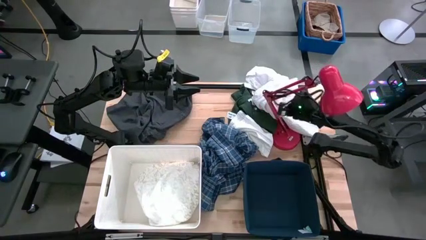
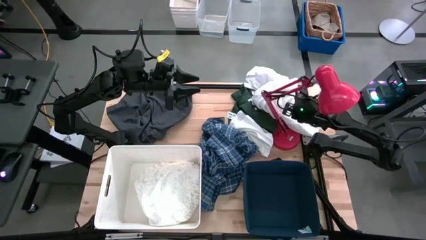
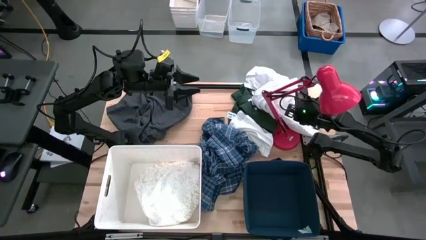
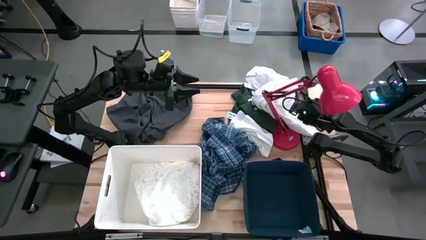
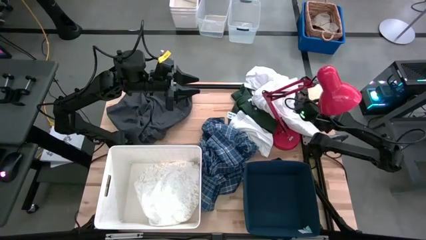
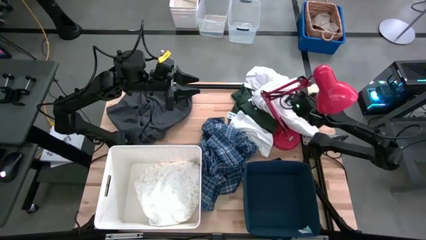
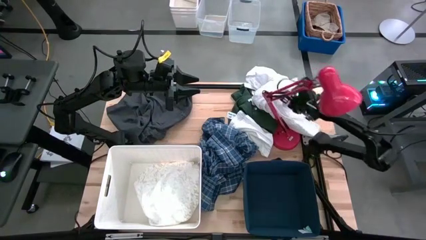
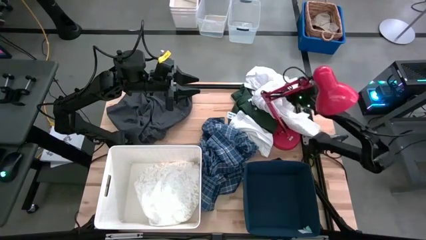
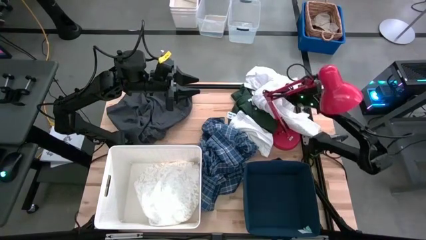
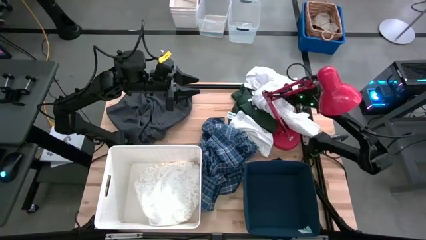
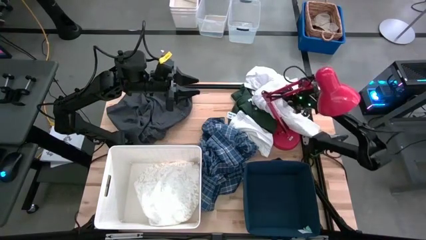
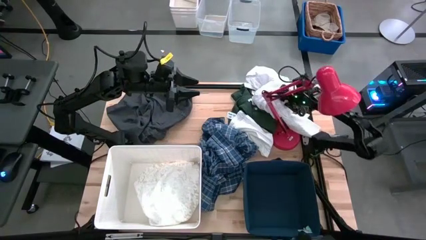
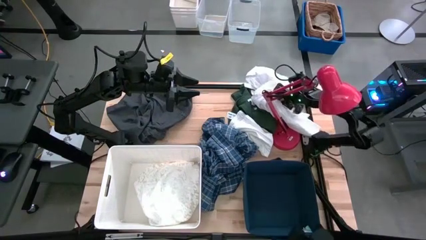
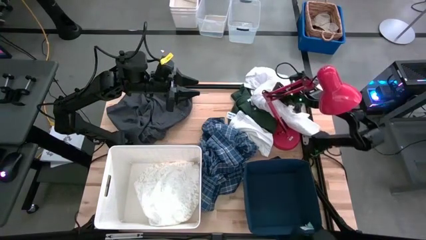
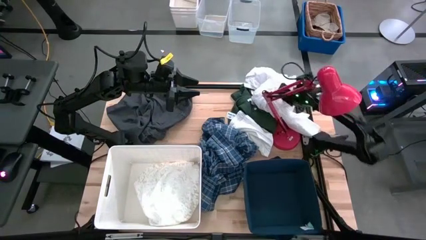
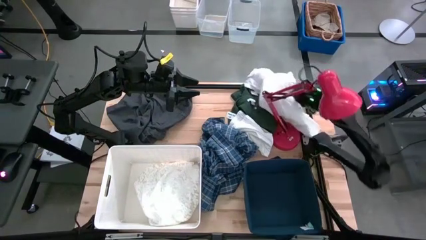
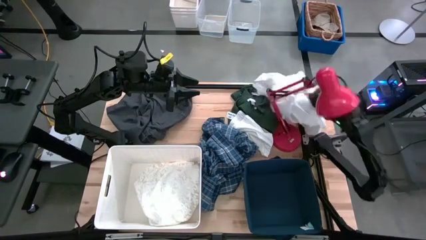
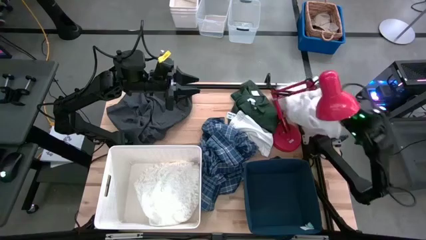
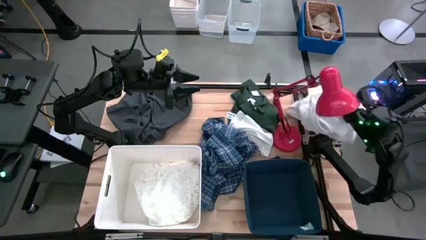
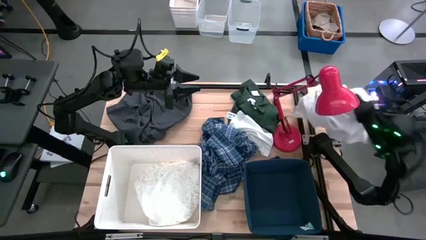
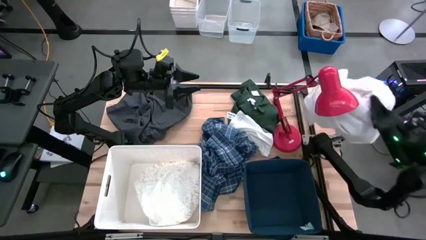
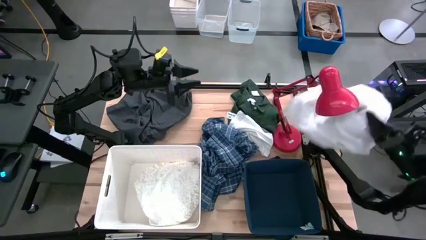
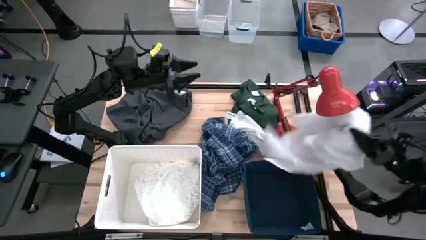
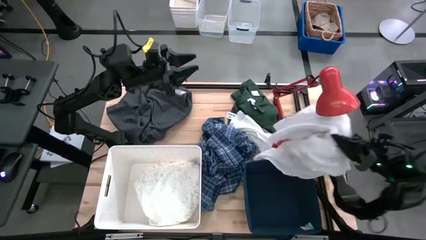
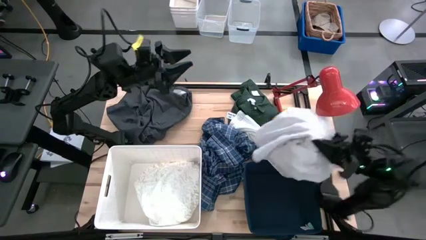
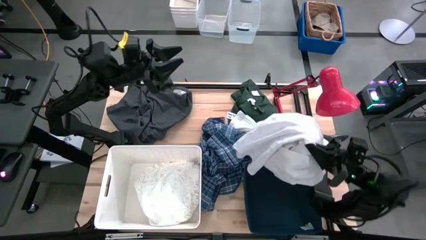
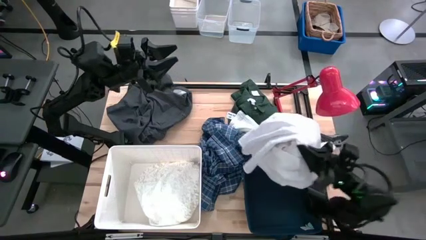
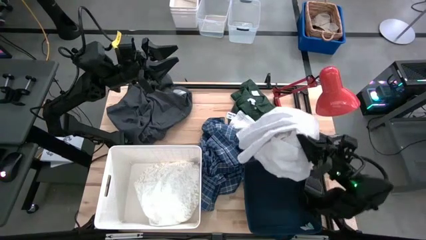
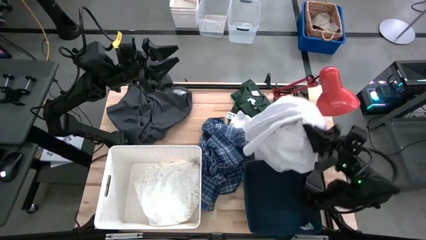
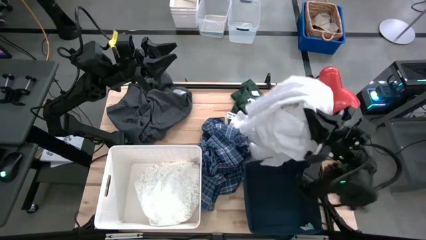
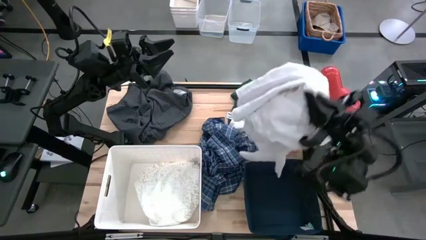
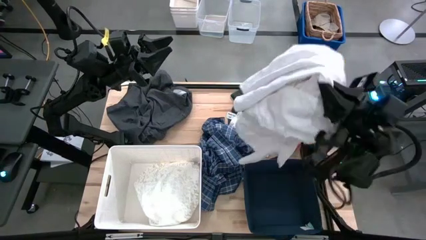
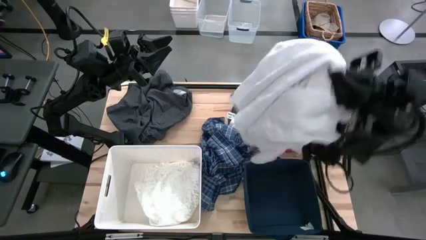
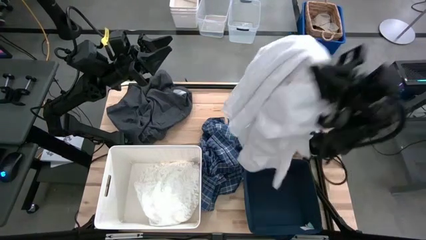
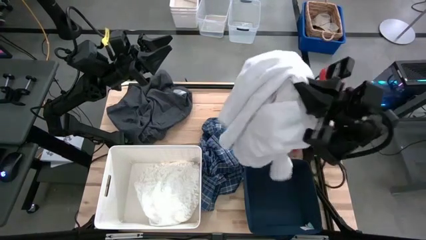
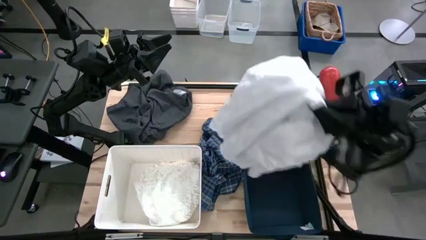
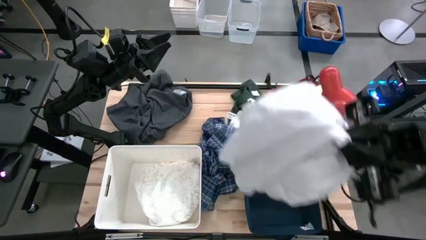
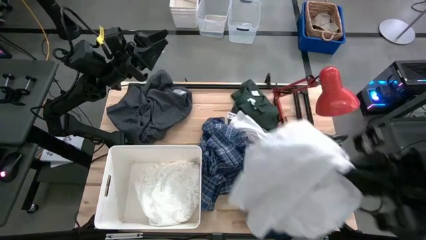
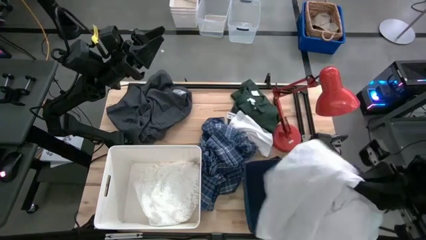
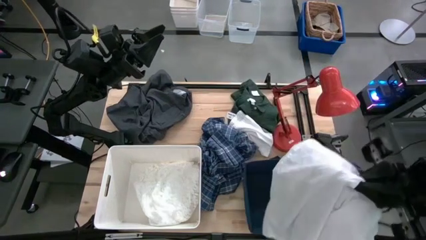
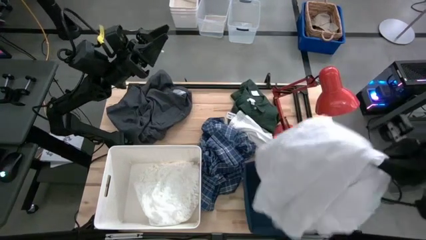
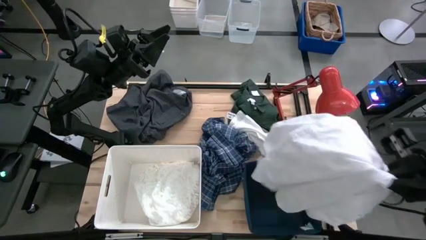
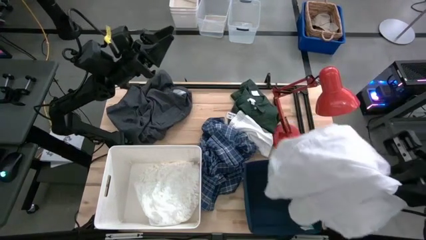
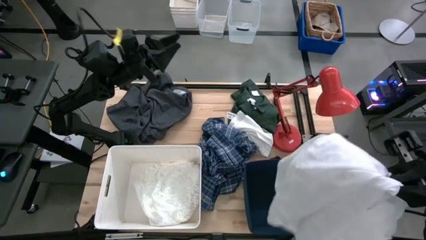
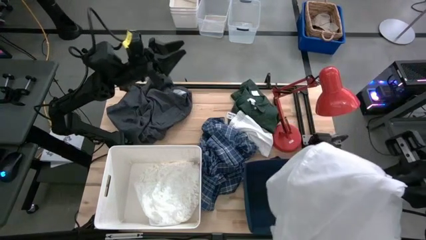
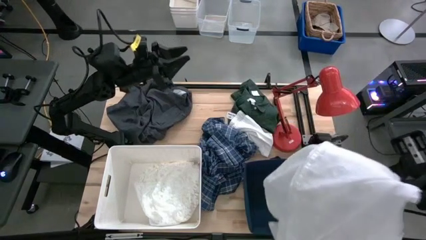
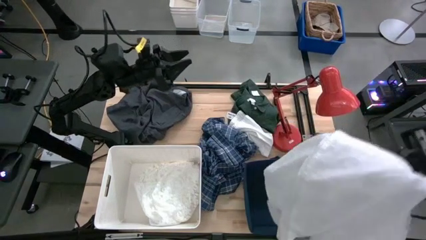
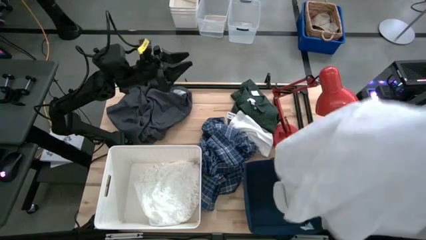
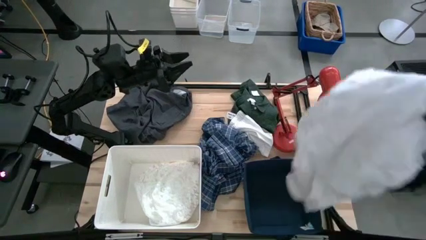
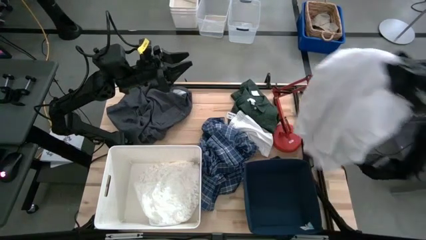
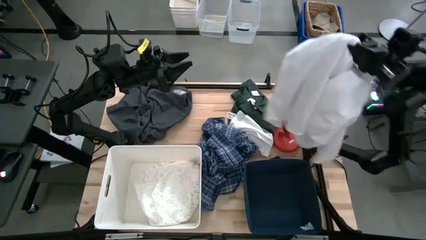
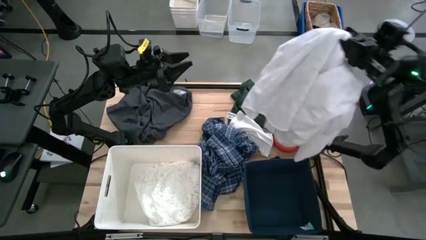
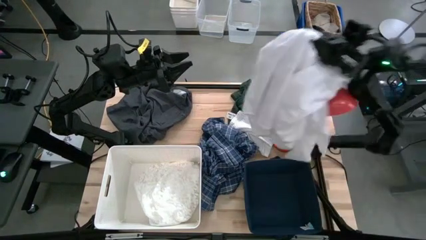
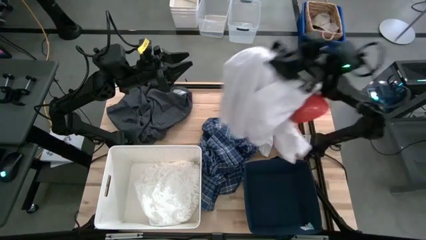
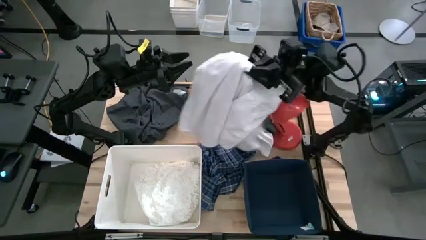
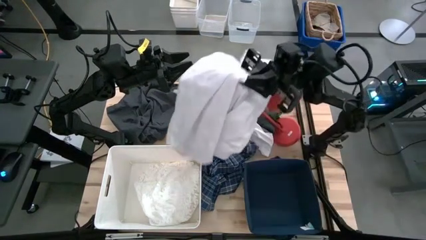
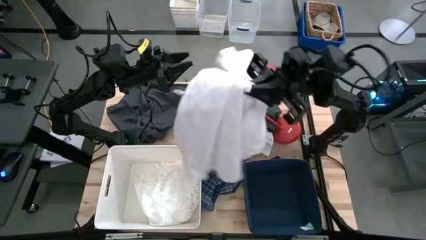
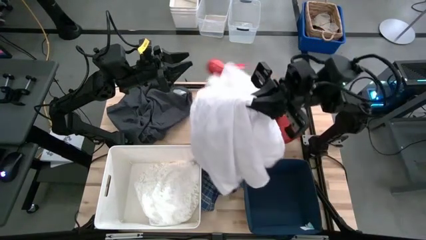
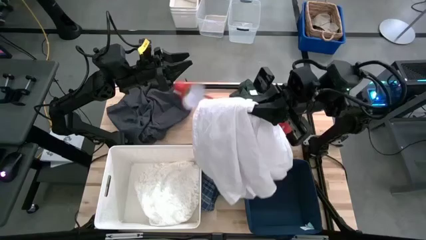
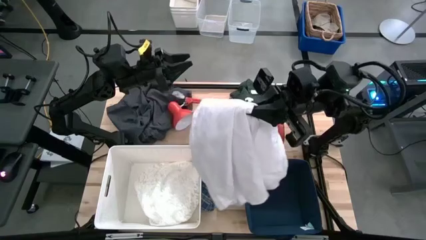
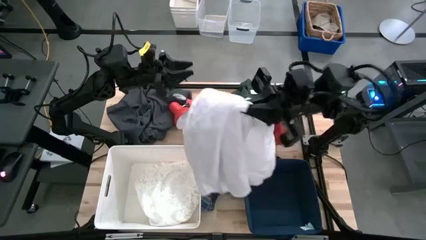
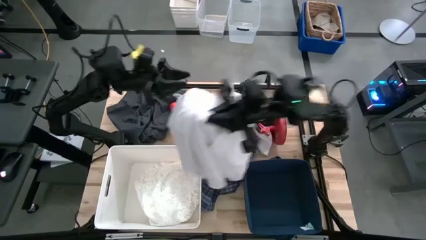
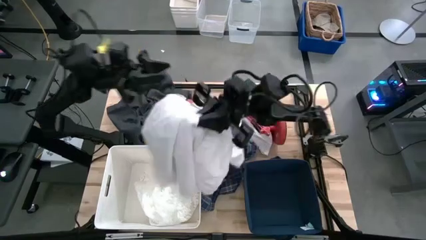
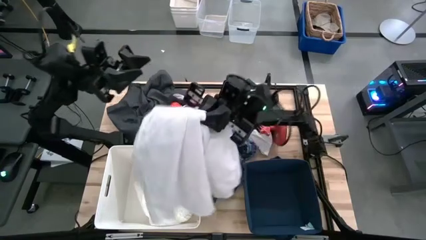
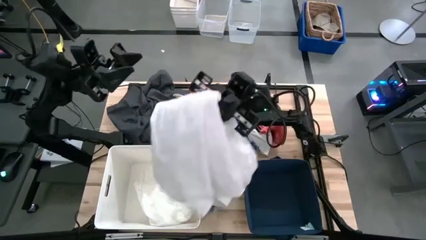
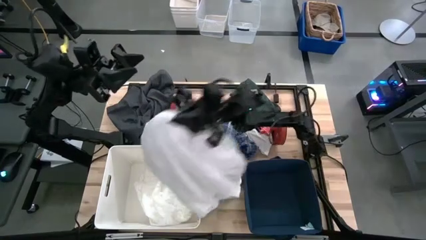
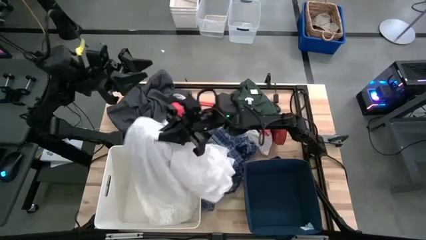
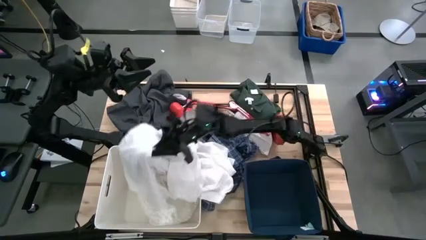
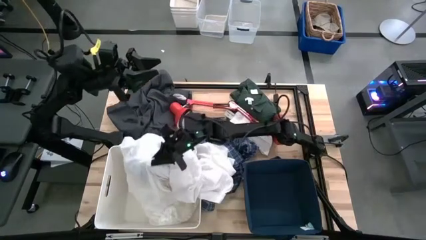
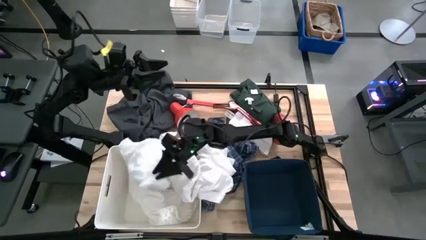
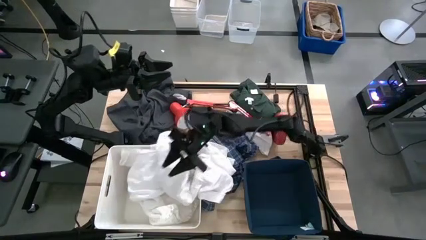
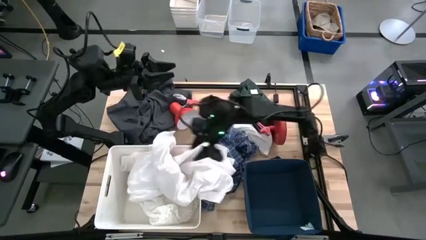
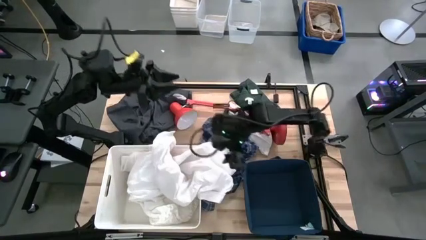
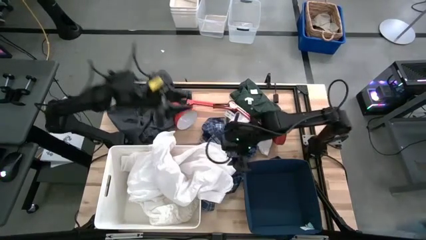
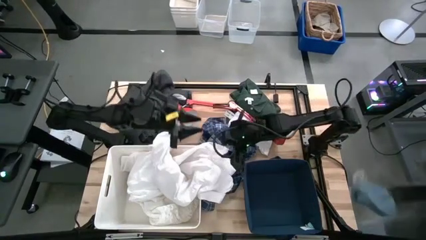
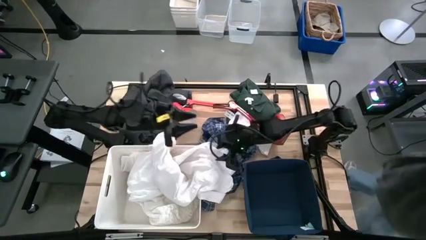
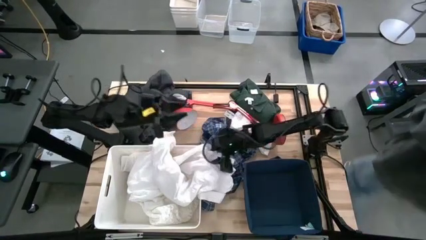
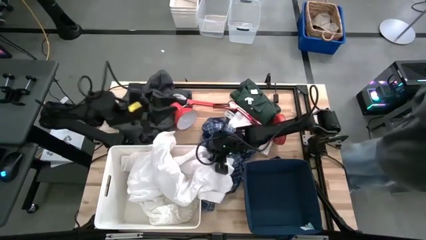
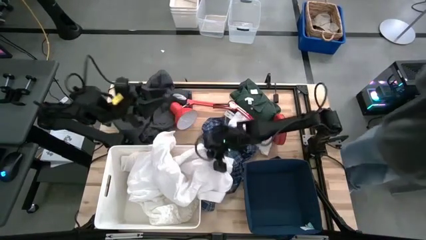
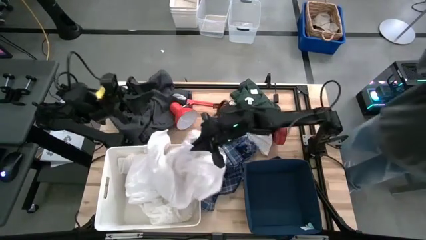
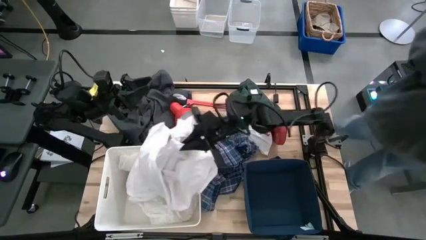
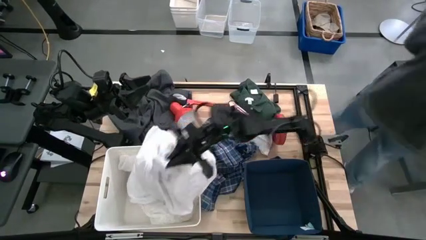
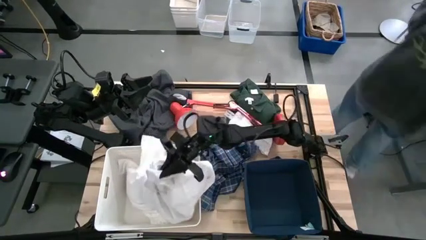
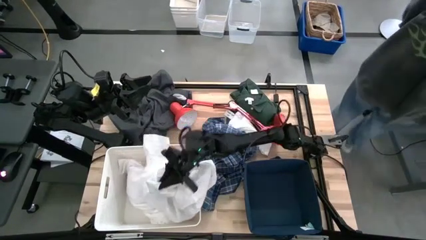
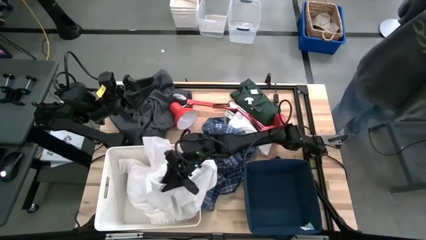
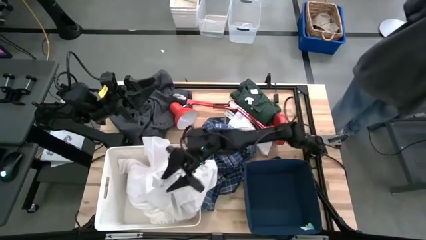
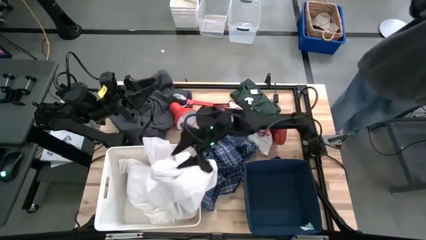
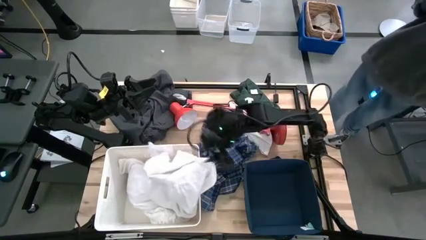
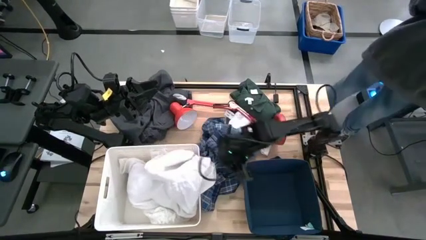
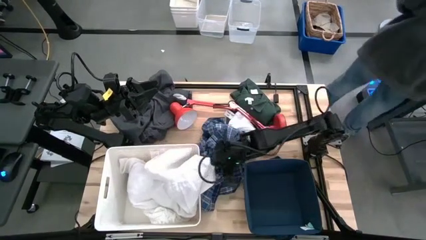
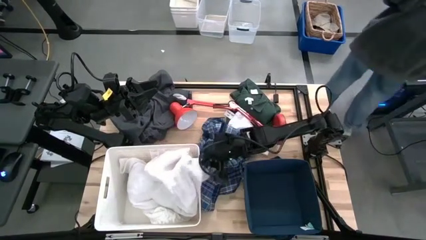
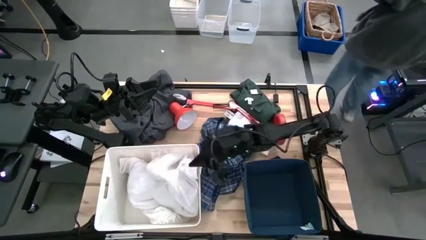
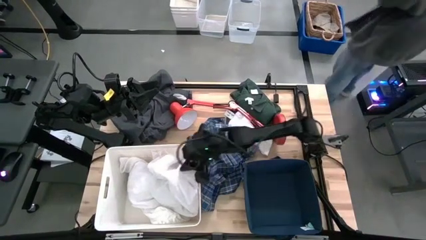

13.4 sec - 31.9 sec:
Task: Sort clothes
Put the white dress into the white bin
